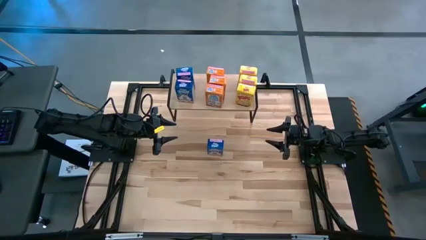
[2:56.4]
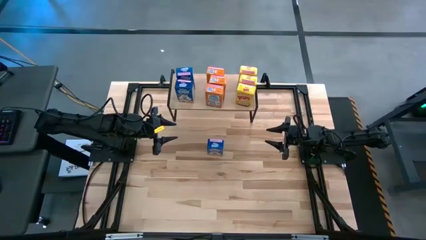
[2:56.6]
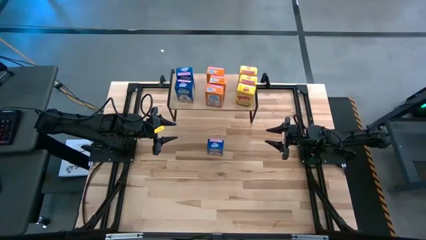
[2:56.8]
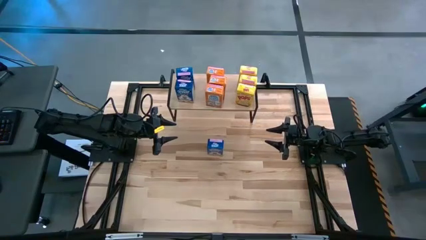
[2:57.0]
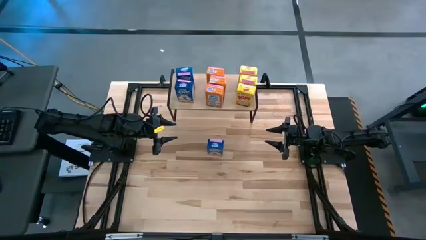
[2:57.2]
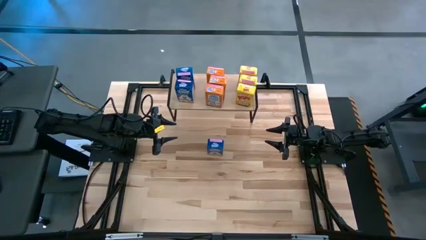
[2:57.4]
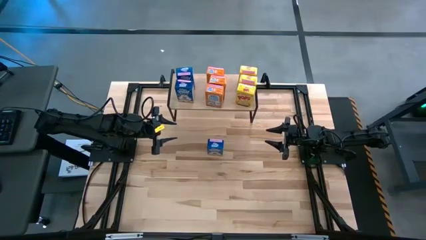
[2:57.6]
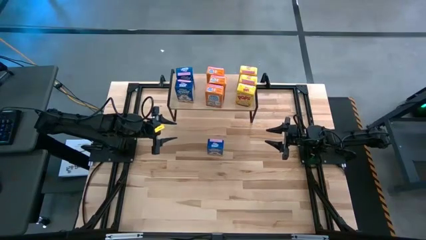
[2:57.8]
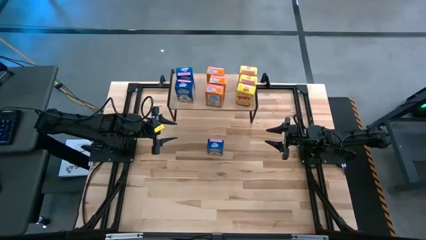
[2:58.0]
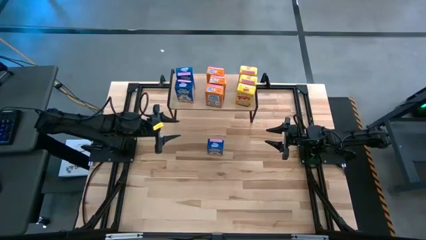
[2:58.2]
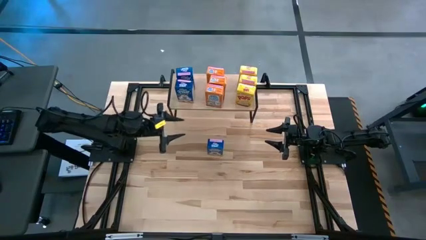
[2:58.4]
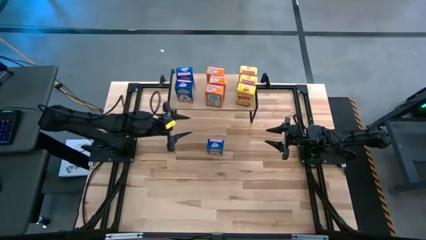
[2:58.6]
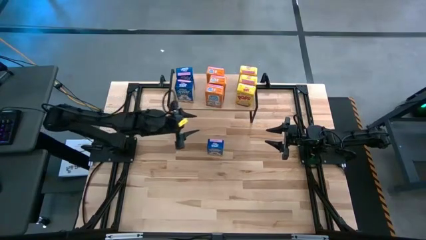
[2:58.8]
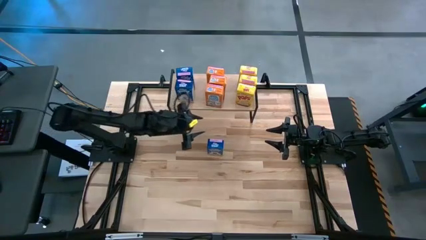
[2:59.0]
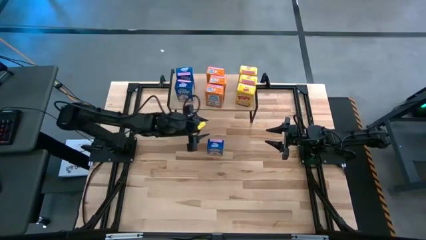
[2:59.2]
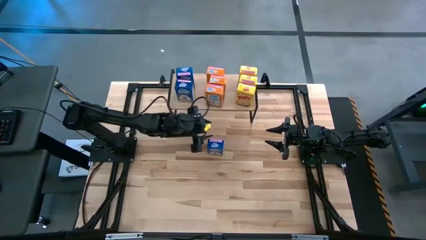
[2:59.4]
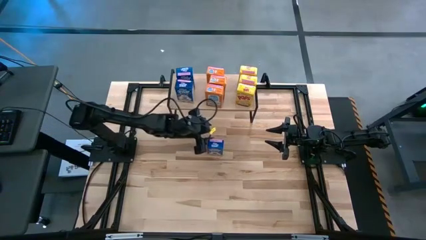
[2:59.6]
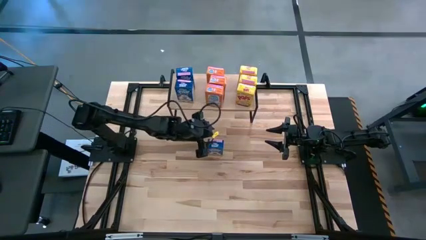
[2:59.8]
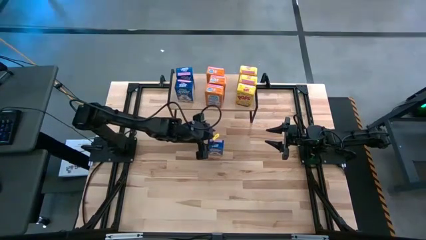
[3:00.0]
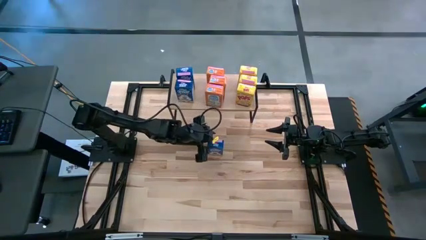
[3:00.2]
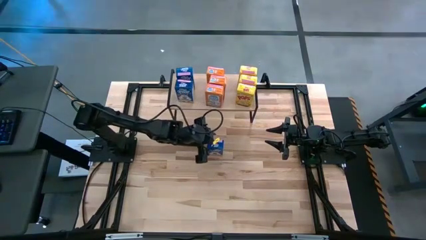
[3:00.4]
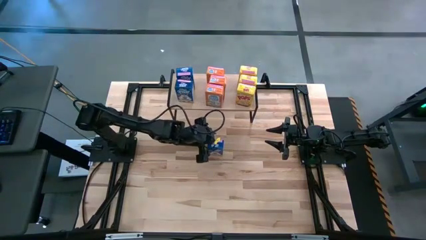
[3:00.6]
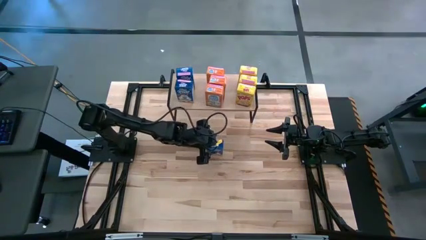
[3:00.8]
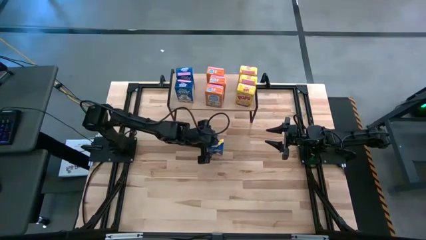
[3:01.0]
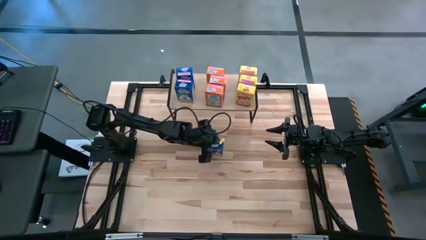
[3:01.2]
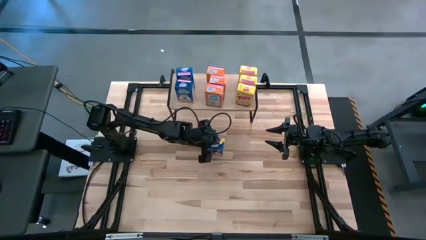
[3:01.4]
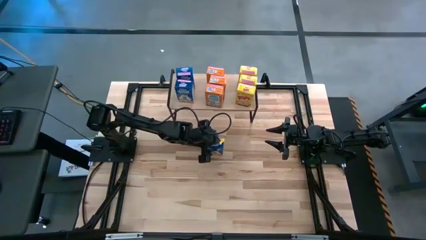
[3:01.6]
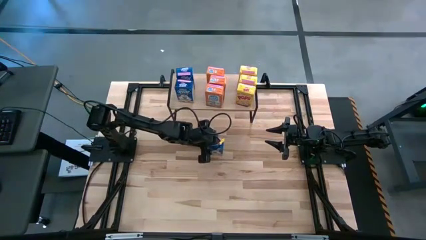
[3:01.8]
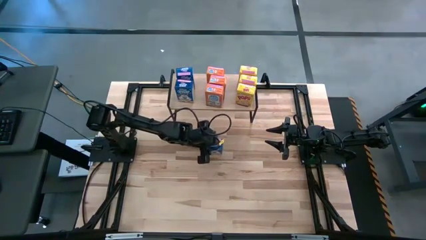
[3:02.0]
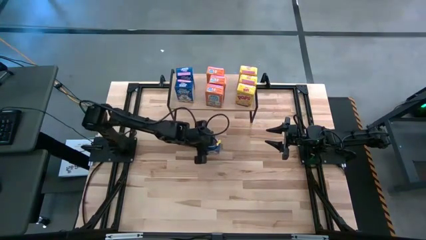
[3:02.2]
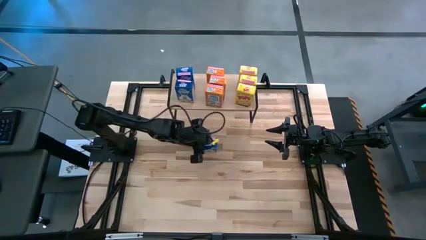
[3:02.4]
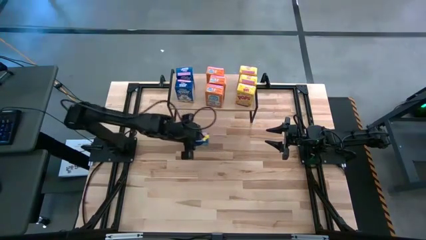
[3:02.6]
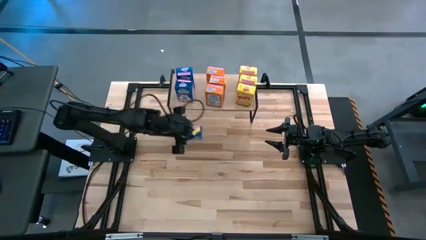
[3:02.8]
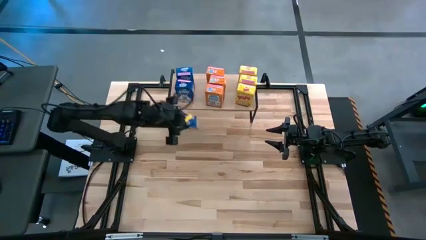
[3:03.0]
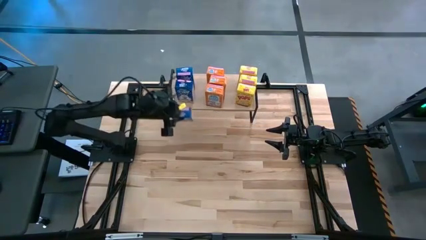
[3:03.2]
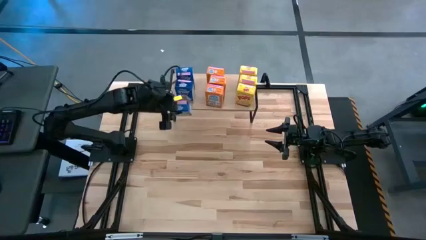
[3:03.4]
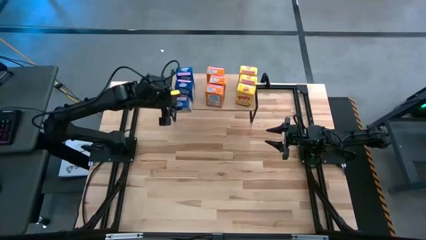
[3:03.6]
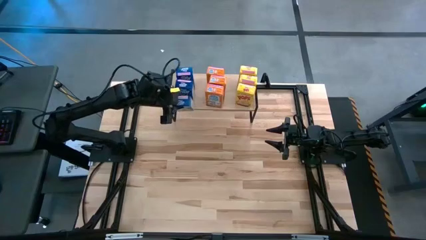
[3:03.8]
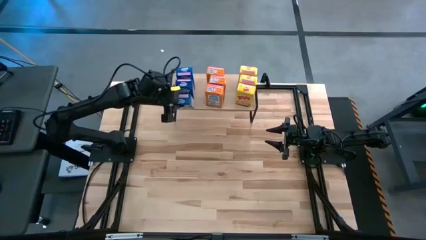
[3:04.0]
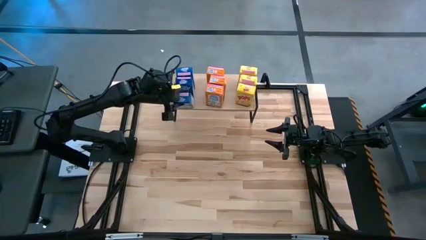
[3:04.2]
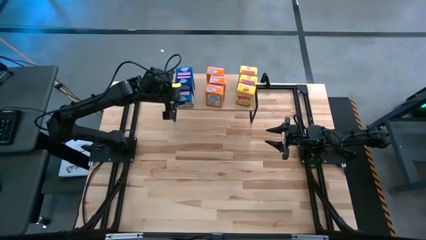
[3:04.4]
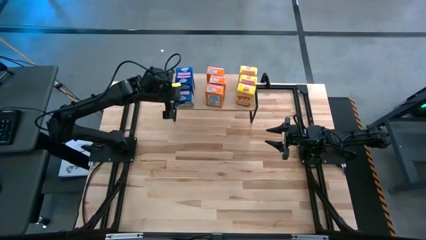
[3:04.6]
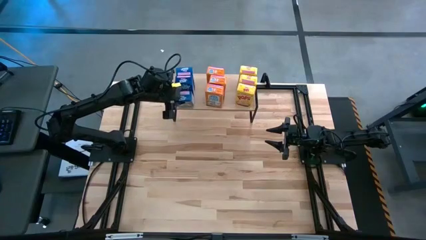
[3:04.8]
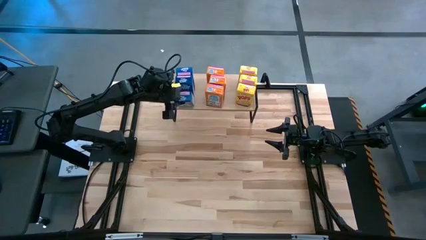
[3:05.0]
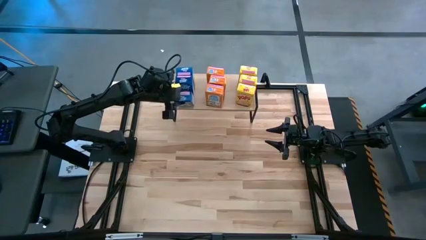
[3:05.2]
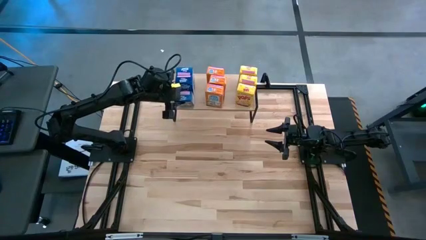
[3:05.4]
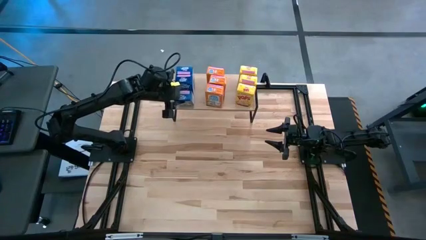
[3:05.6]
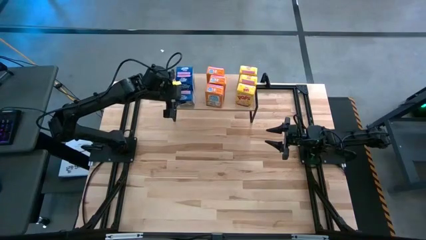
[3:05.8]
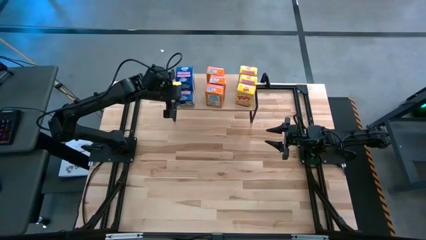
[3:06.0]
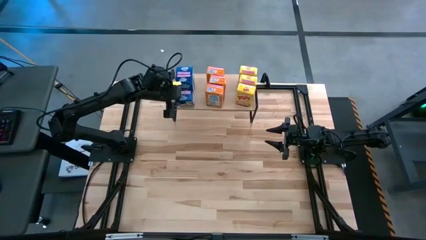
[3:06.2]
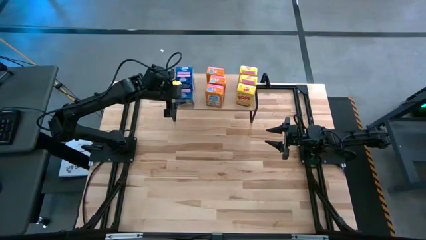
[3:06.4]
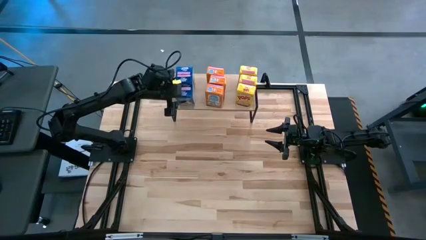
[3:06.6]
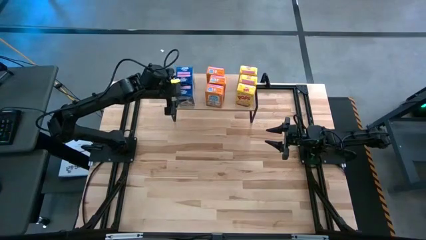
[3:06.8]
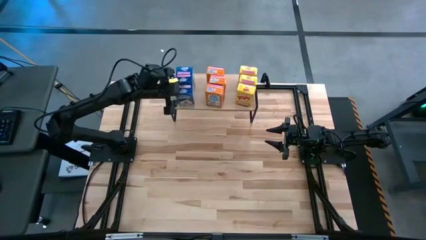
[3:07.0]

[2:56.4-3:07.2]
Task: Stack cereal on shelf
Put the blue cereal box aligned with the other blue cereal boxes on the shelf

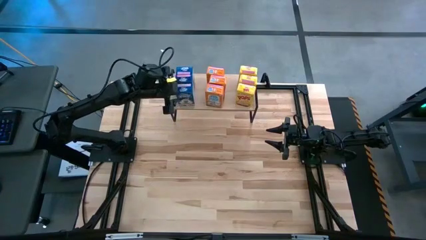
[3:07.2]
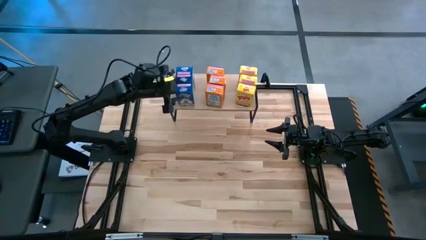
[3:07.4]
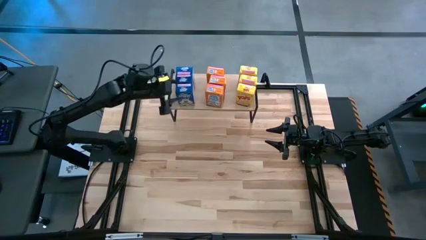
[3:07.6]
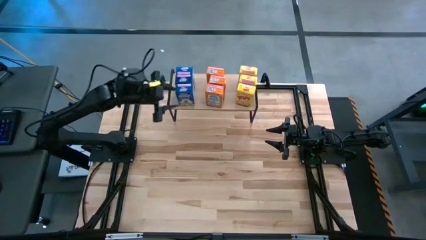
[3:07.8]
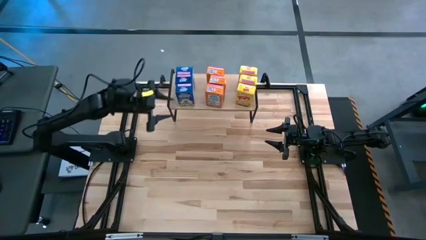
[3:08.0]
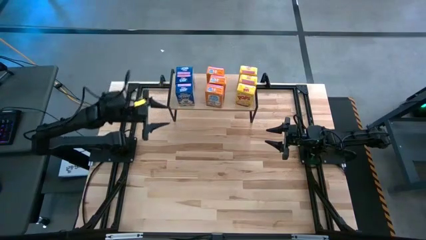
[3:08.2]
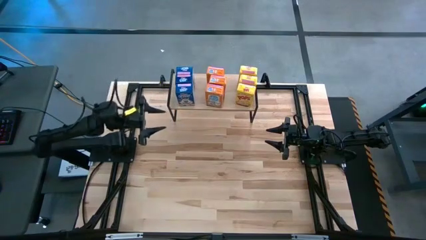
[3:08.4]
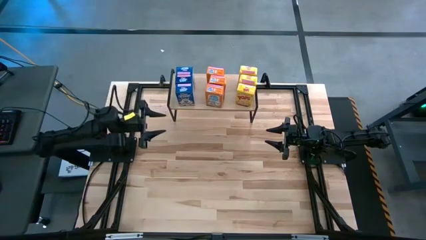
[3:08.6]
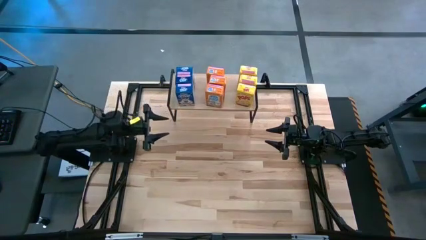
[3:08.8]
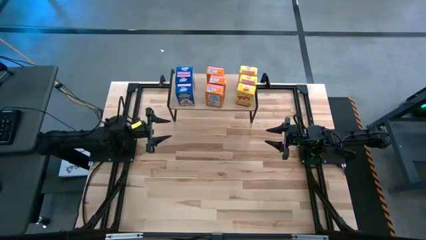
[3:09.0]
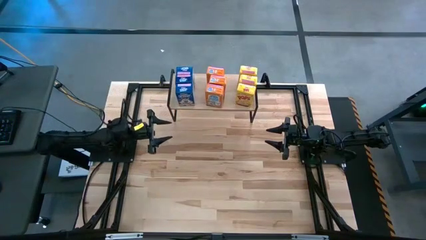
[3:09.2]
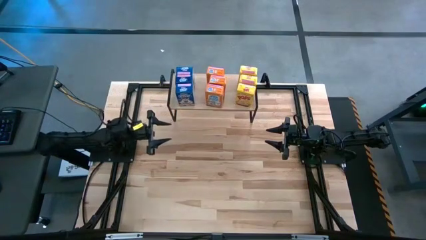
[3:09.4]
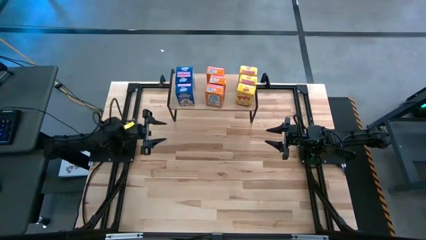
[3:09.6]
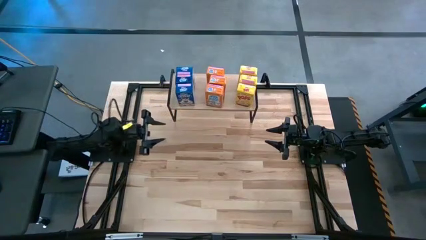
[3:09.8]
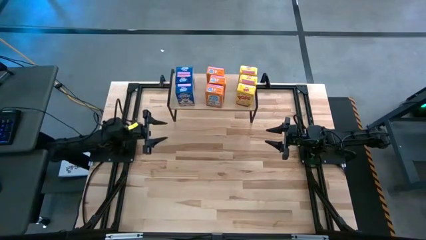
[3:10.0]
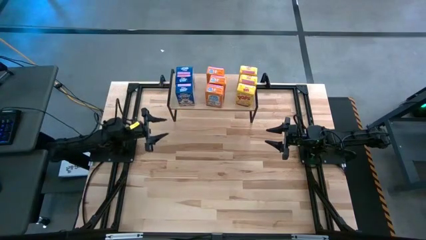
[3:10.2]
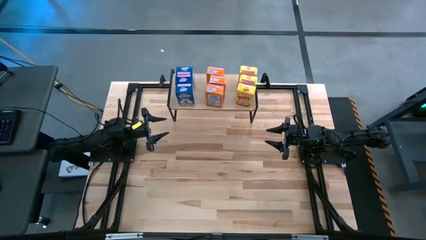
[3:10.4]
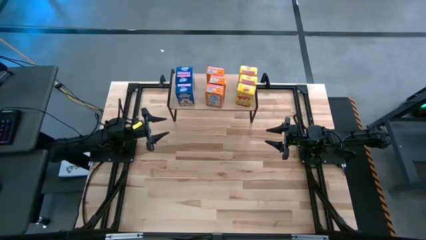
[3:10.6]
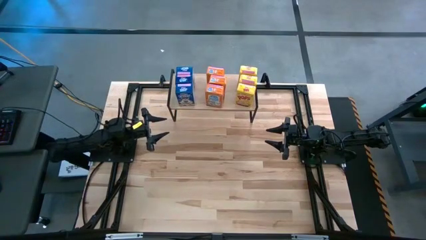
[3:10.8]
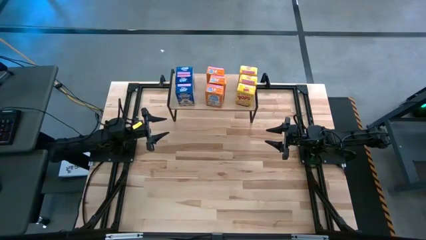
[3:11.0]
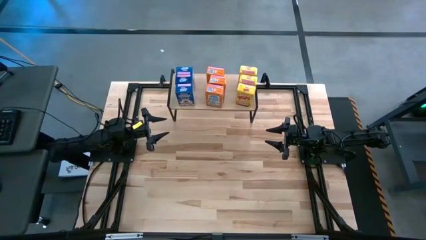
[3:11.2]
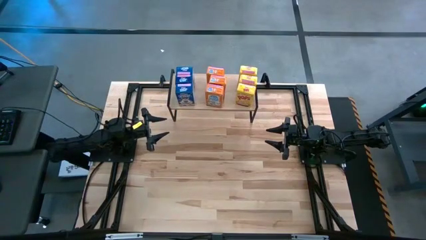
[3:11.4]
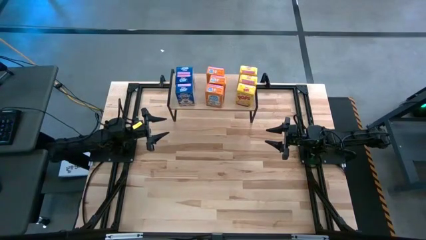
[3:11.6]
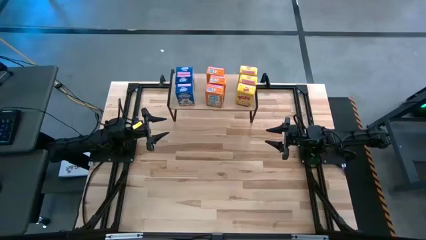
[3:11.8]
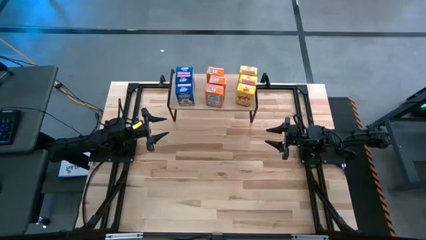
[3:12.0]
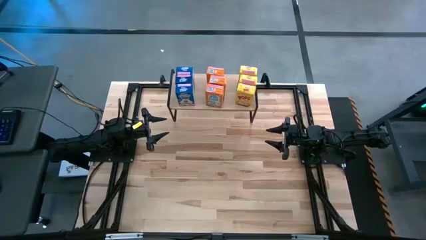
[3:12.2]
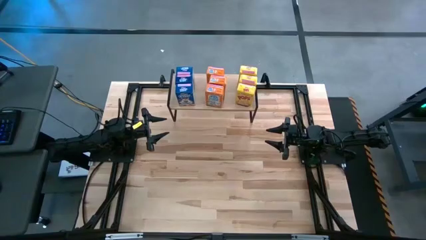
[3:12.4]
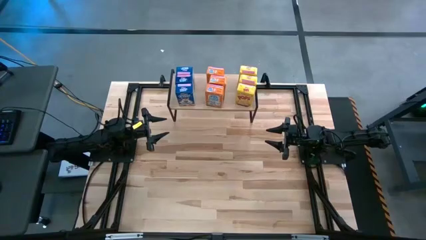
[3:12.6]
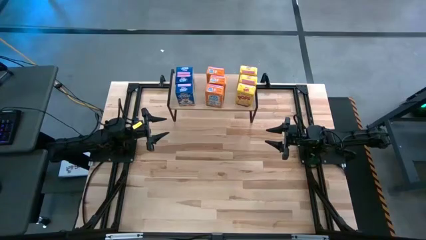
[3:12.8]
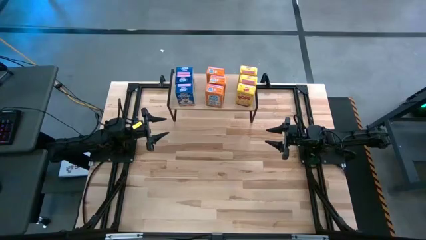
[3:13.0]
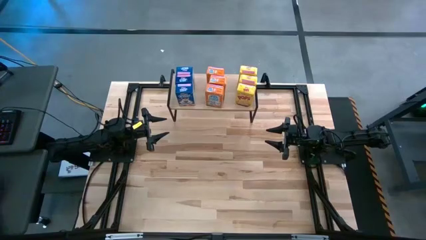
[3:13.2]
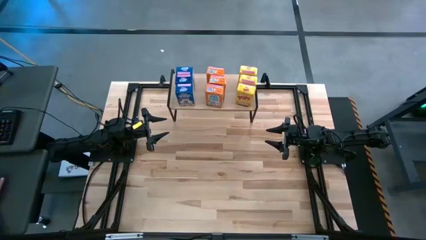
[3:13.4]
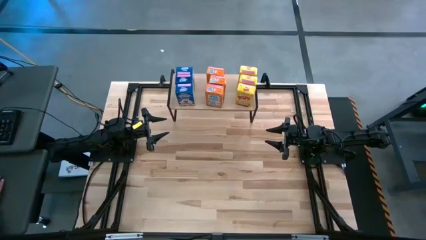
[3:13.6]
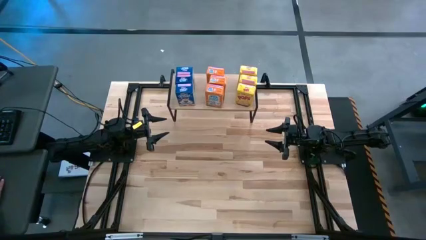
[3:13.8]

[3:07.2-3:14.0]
Return to Home Position
